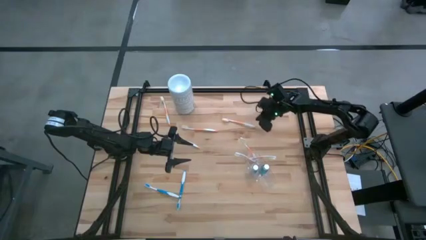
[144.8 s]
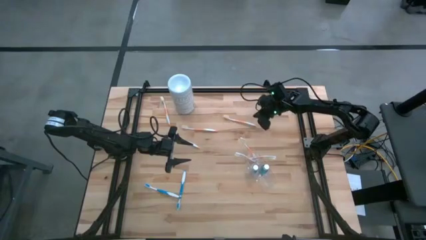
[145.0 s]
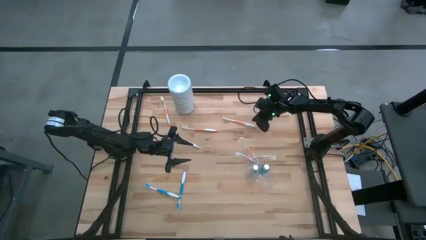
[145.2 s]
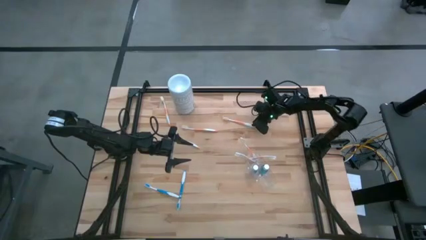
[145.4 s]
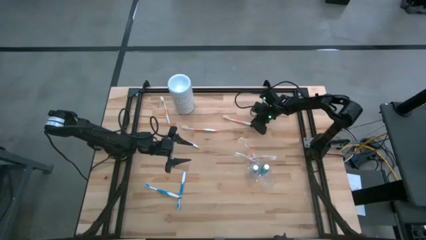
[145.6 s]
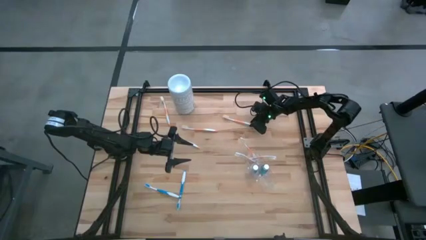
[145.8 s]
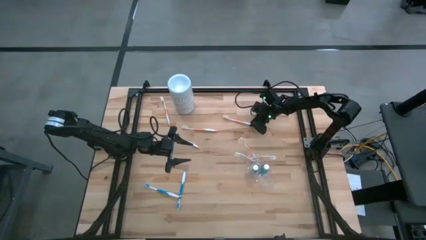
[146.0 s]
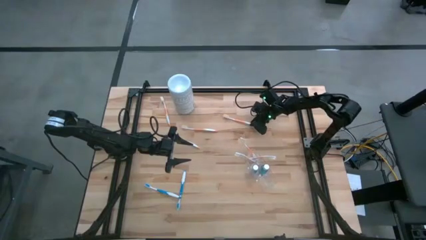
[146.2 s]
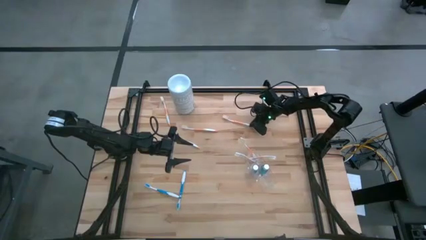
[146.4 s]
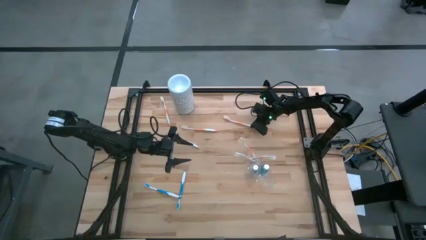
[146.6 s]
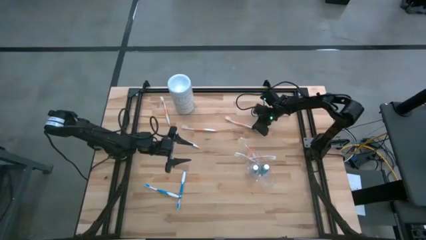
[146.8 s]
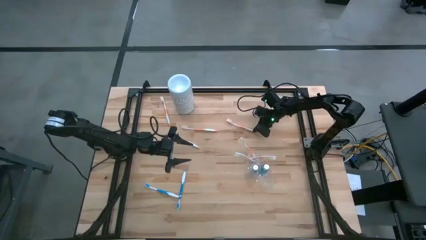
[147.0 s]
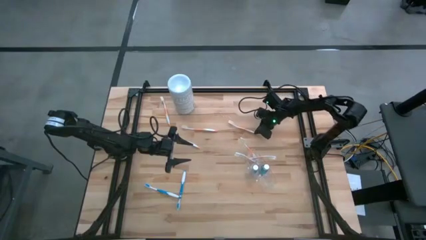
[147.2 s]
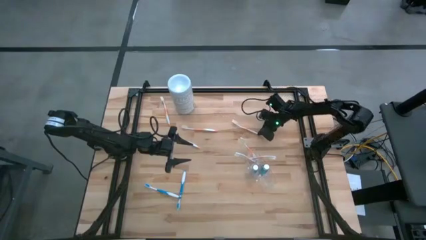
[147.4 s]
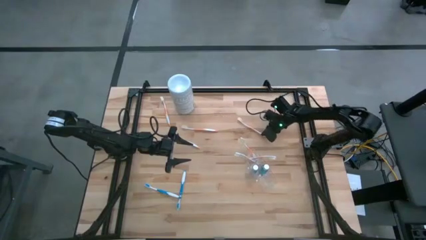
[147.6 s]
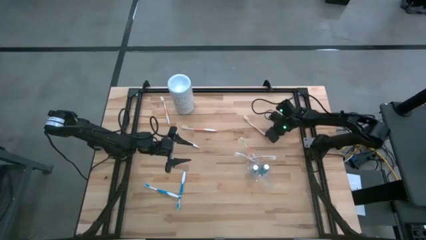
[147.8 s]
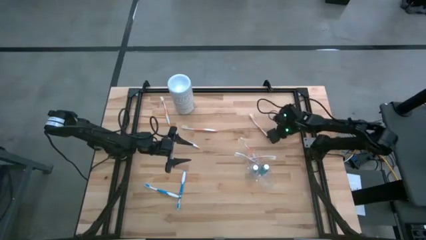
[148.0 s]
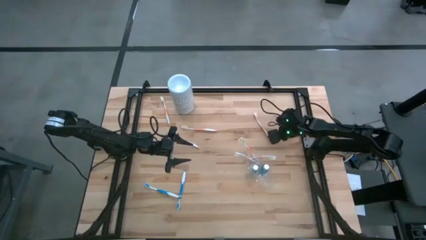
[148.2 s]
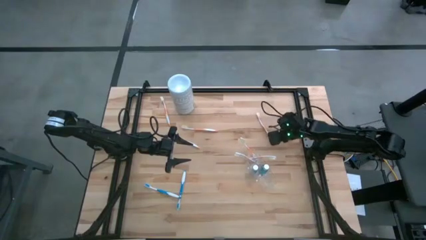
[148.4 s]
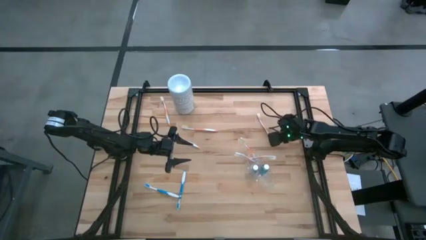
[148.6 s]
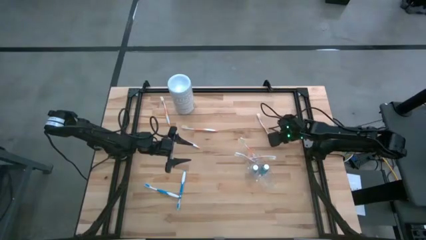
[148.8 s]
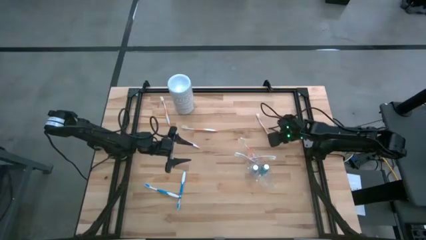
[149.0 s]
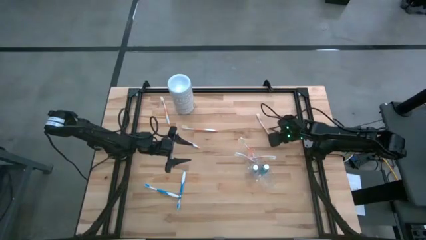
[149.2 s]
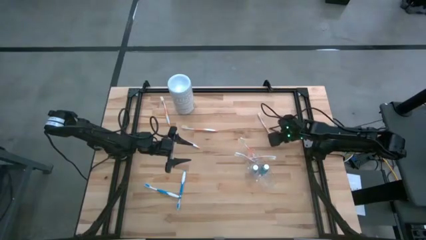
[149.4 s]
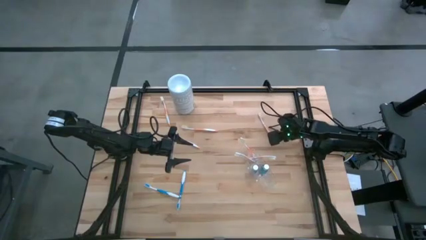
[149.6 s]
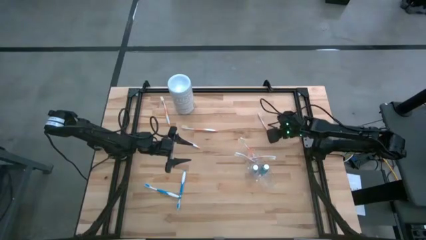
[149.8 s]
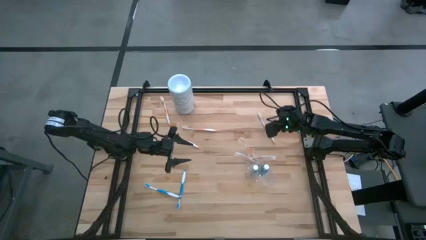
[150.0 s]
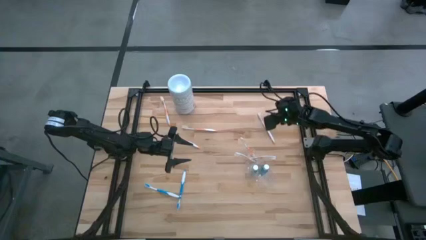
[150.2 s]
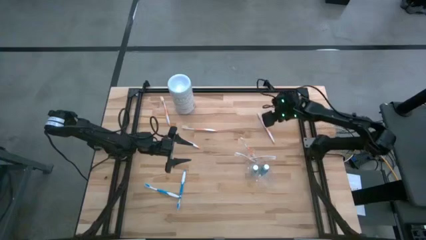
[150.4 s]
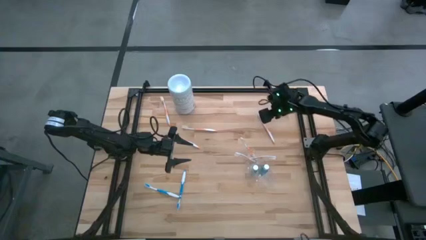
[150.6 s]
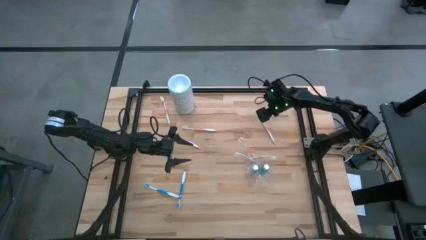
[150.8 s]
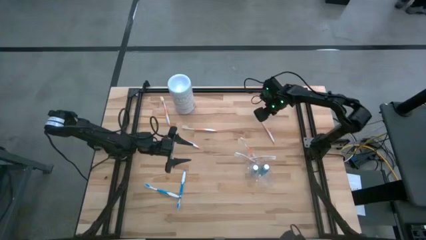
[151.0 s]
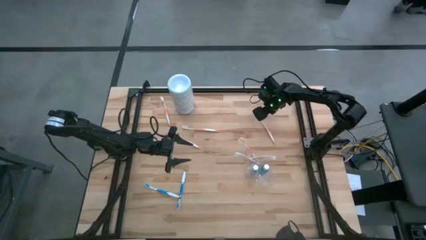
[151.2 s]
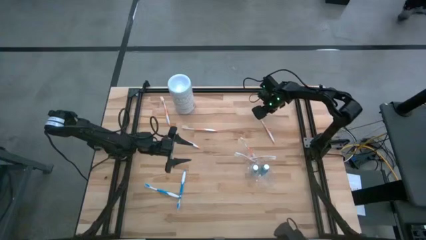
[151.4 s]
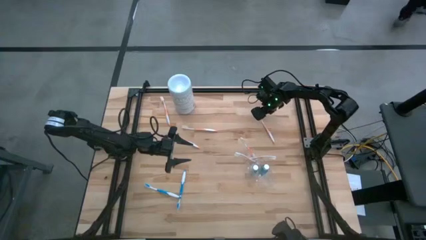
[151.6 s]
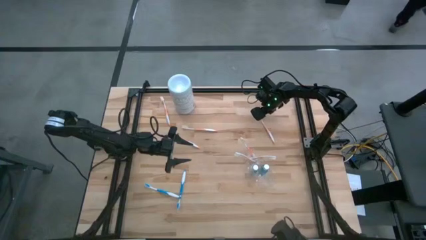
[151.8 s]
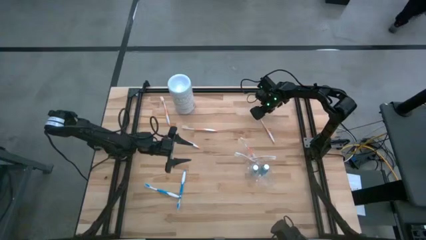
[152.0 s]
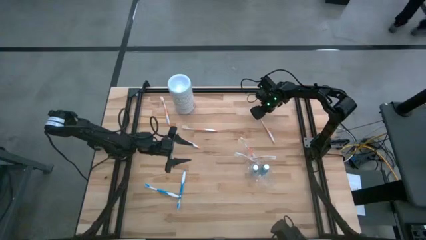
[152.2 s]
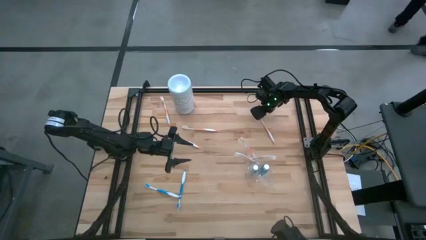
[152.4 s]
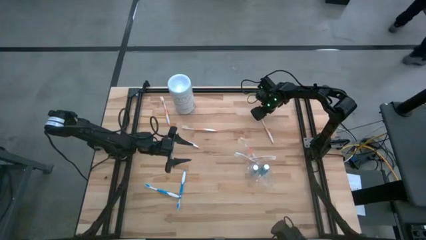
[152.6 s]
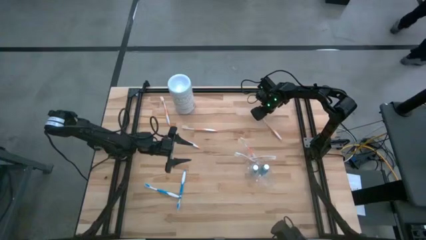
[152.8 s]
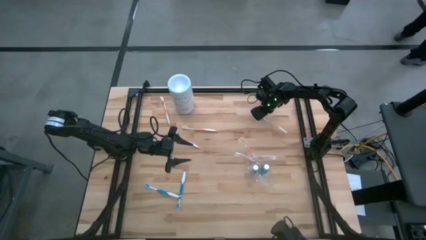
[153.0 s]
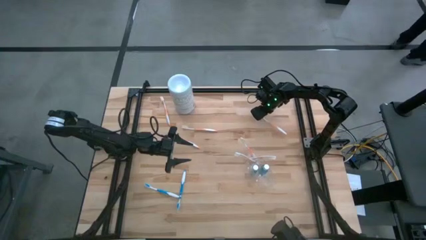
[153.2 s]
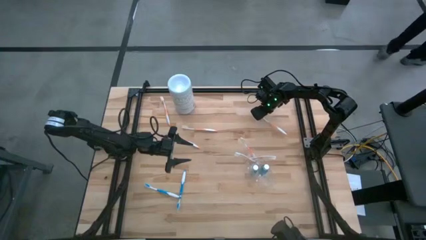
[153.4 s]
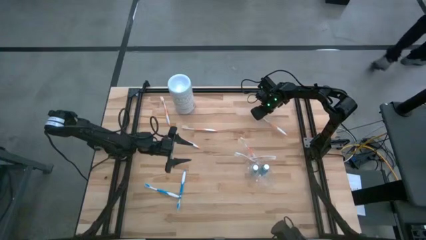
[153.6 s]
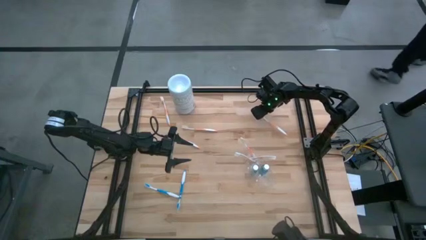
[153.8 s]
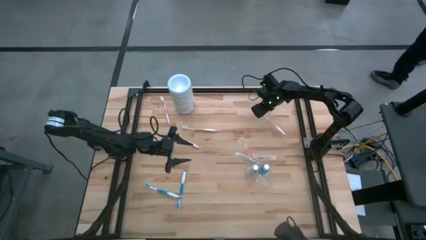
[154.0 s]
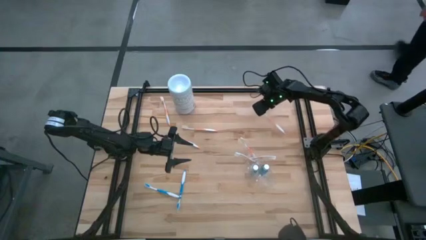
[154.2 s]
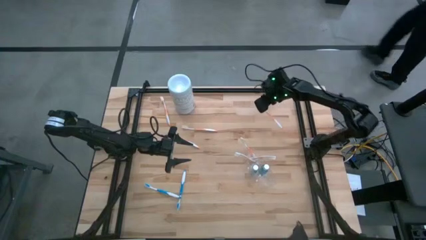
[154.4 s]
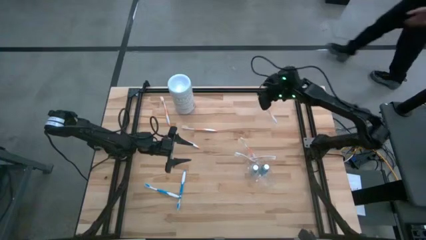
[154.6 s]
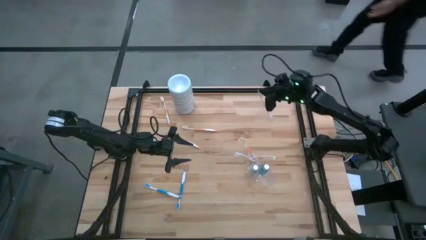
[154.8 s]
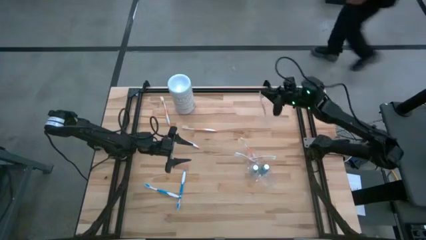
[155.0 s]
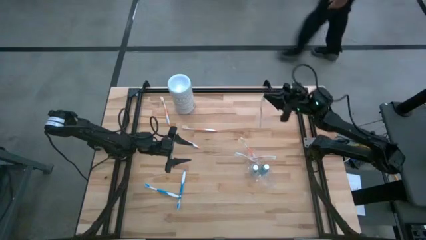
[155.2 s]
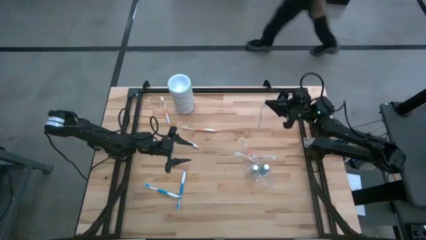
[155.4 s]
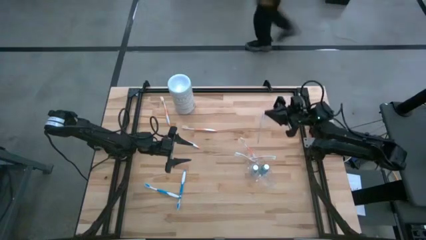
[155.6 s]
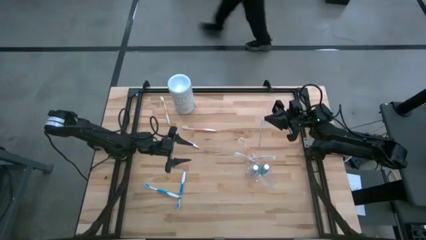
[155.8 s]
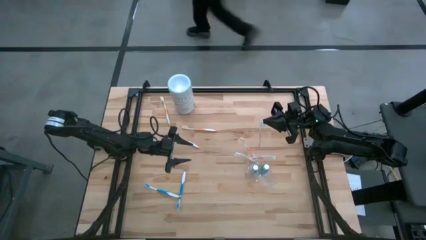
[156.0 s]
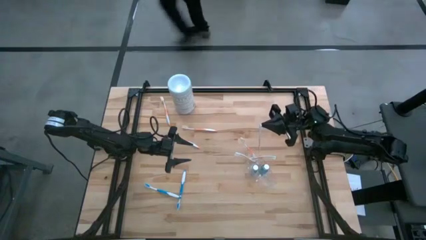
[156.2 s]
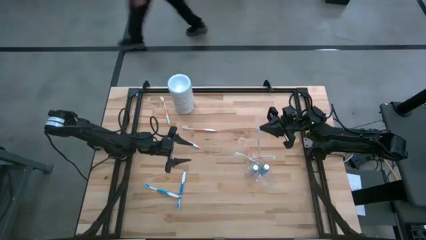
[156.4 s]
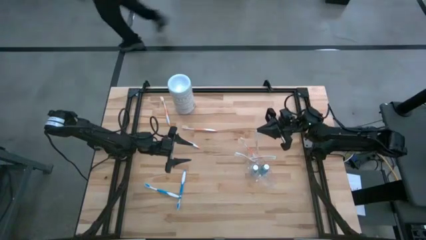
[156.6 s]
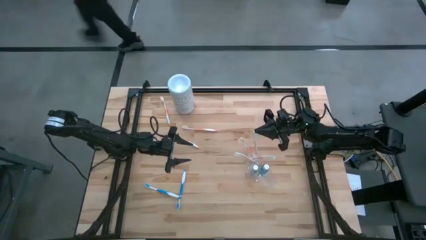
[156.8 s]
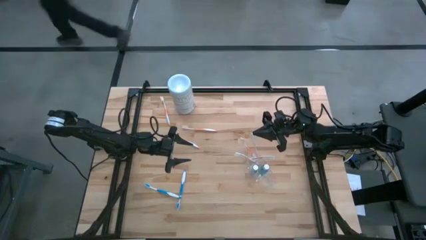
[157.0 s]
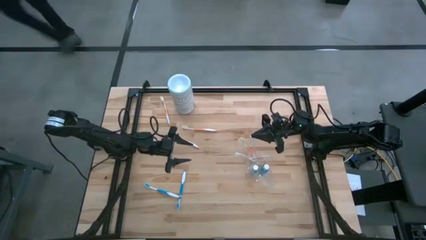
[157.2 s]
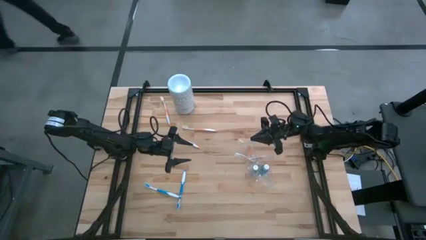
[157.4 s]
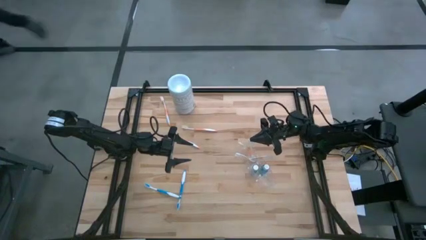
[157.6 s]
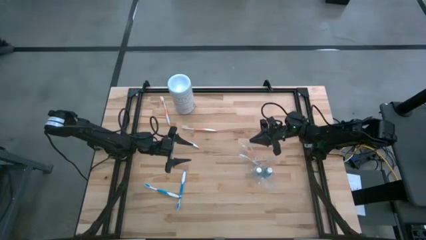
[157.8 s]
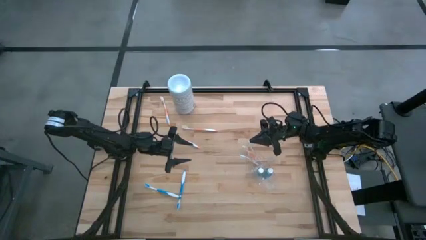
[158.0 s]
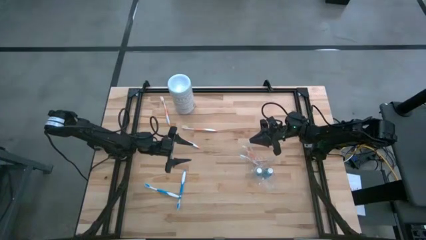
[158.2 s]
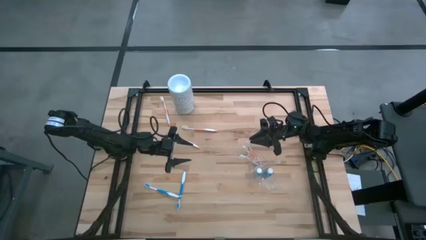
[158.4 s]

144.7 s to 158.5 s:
Task: Pick & Place toothbrushing station
Put the orange toothbrush into the top section of the transparent organizer

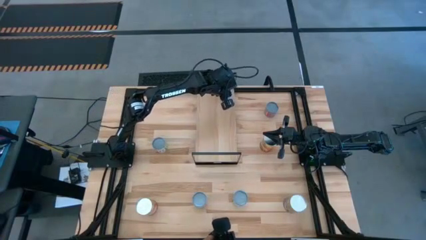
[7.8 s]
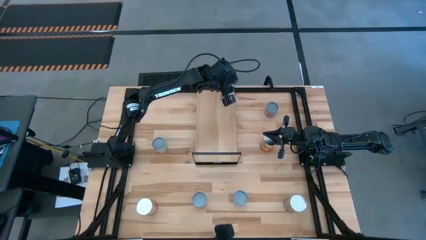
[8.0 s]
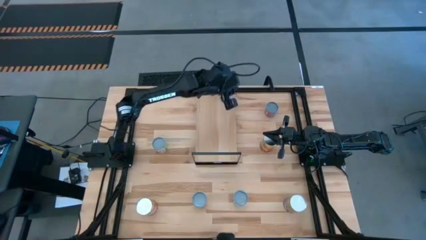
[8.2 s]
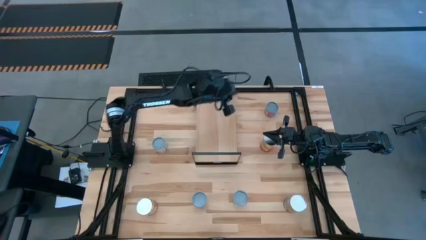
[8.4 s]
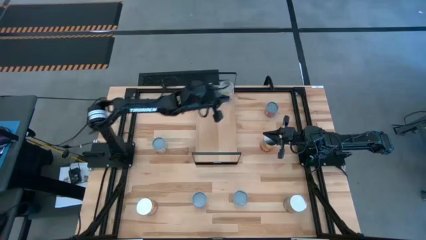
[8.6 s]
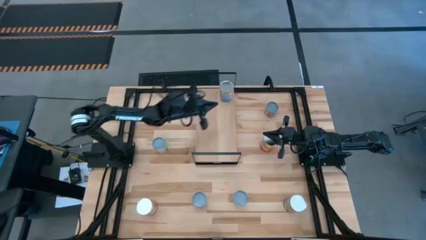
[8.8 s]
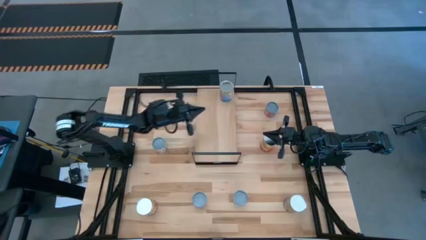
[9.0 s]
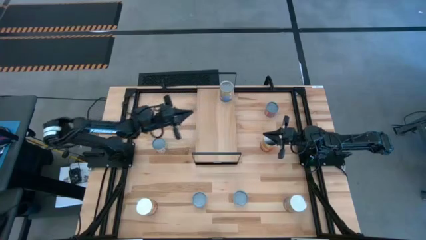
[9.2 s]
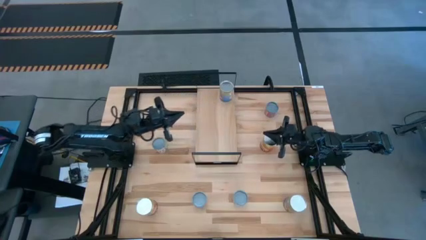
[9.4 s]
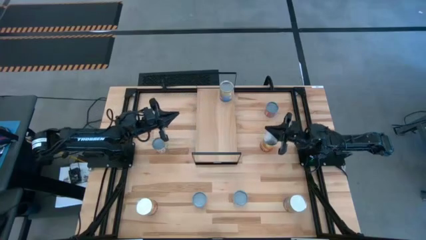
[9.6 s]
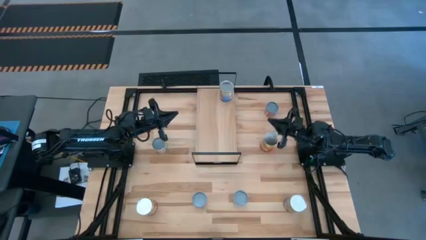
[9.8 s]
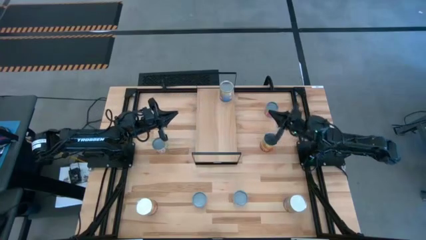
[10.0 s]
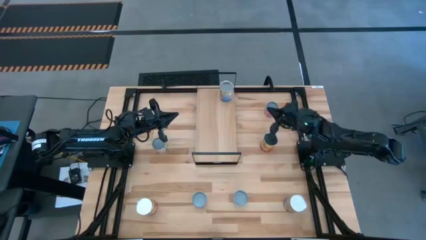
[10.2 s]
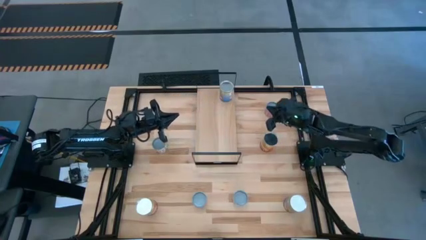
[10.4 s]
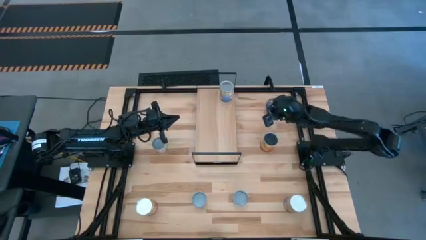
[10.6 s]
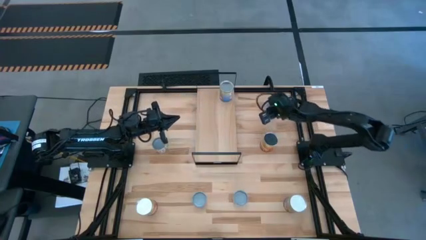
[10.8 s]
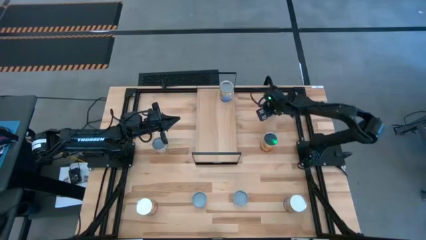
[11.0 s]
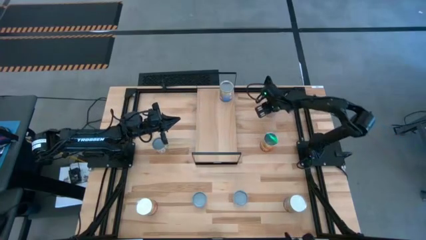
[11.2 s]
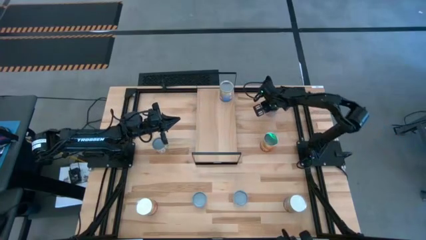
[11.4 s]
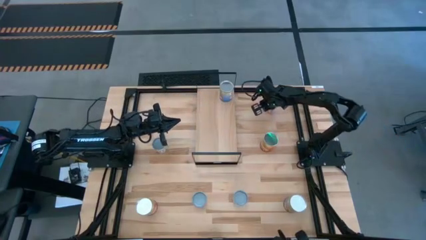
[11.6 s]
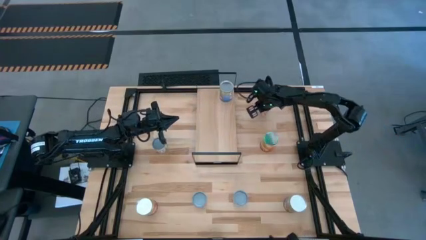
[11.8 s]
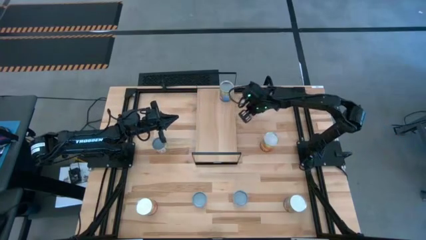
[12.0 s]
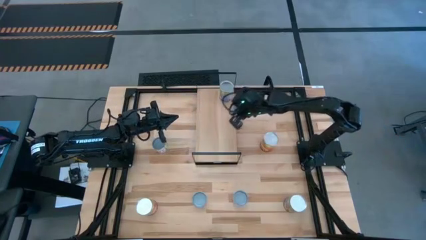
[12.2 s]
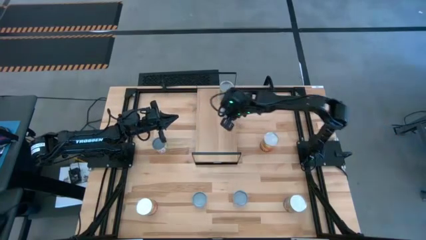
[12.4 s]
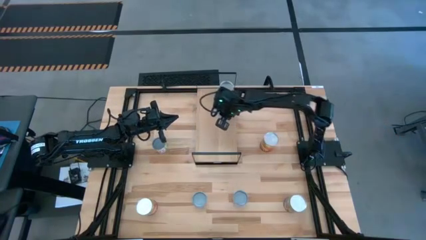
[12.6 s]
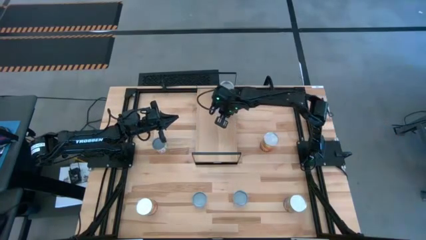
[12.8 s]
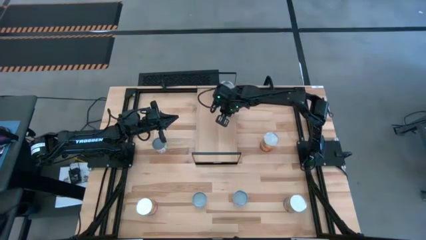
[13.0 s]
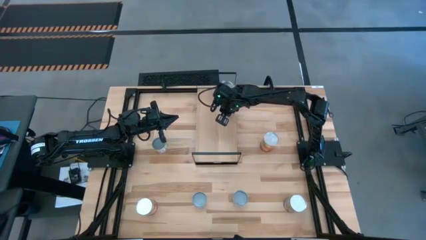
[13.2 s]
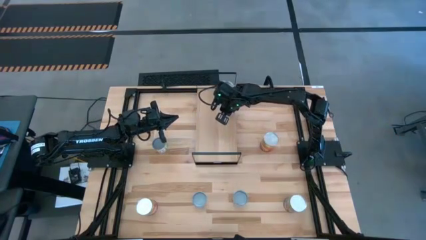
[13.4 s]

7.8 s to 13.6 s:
Task: Pick and place cans onto a shelf
Put the blue corn can on the shelf
